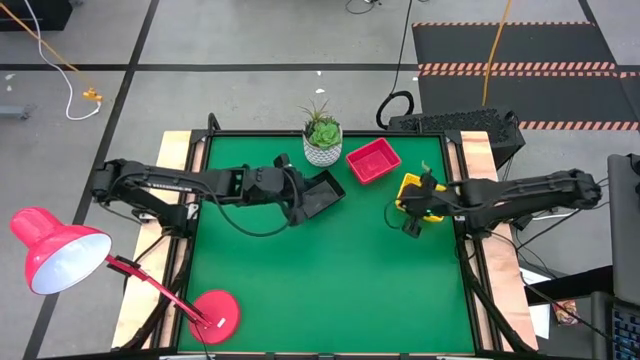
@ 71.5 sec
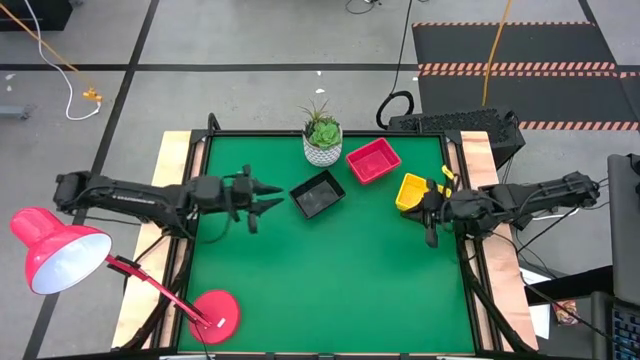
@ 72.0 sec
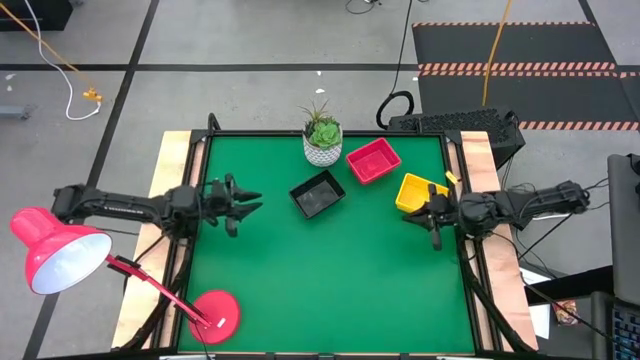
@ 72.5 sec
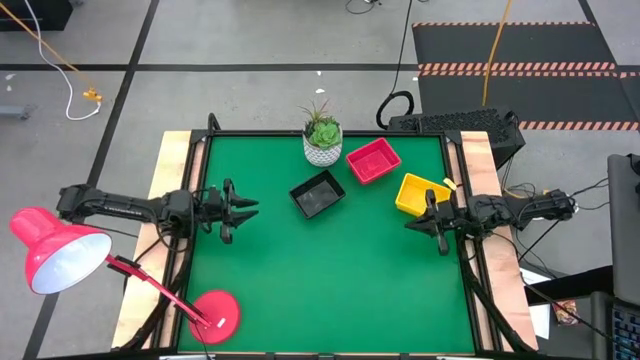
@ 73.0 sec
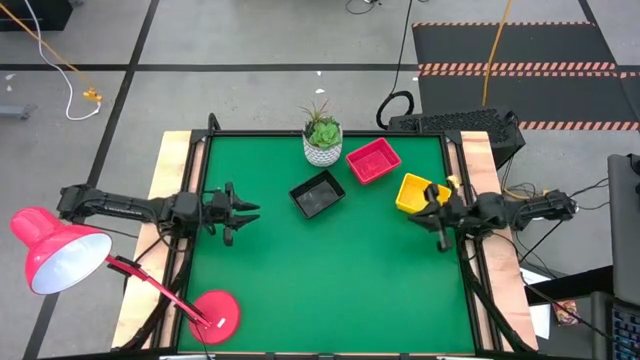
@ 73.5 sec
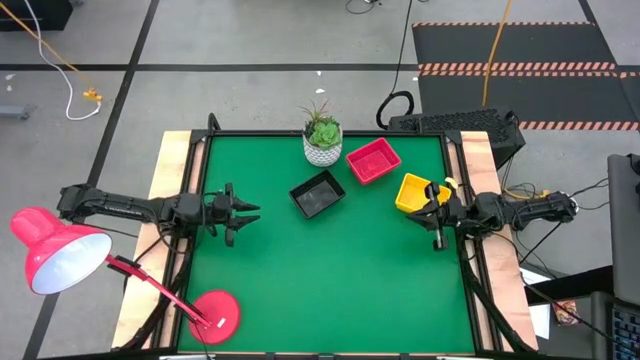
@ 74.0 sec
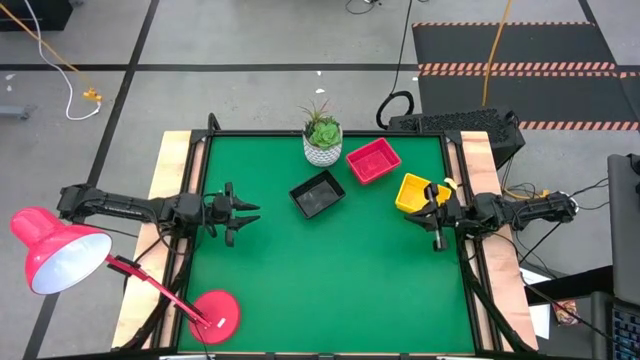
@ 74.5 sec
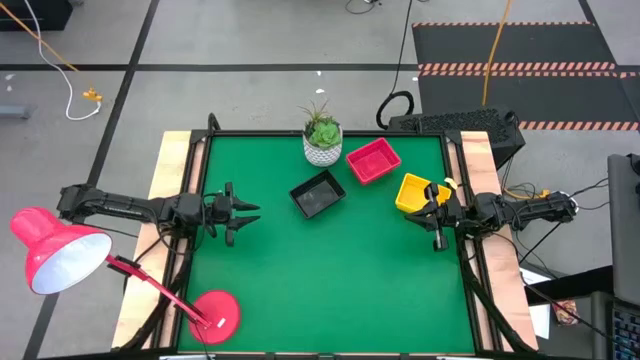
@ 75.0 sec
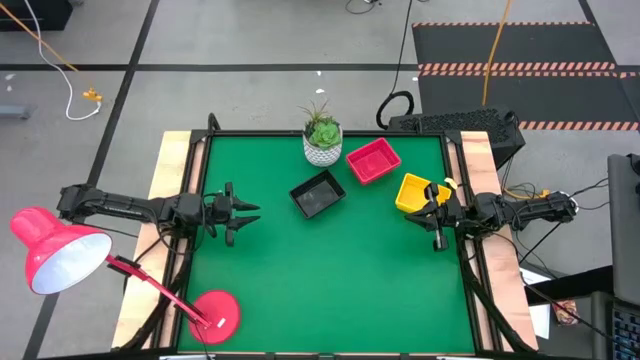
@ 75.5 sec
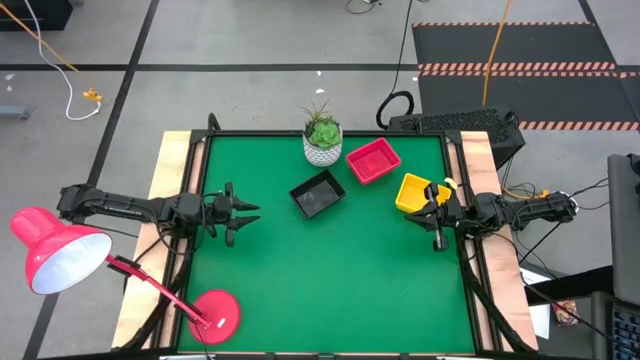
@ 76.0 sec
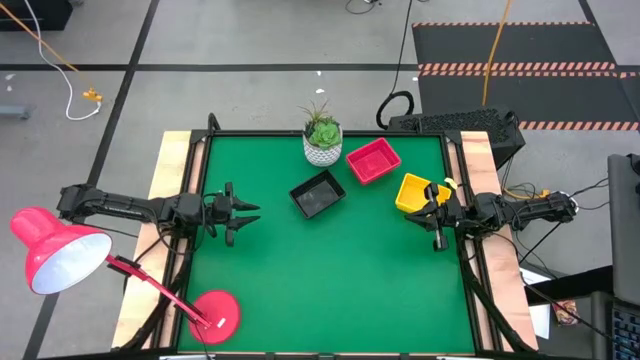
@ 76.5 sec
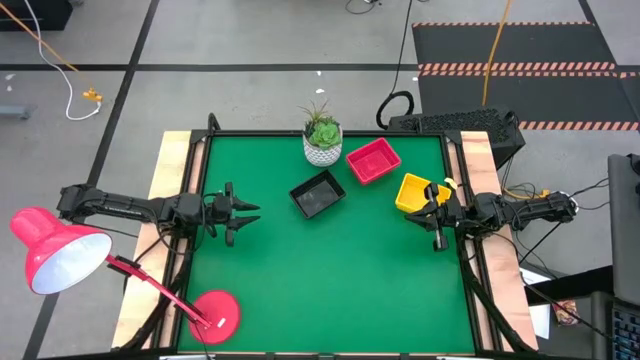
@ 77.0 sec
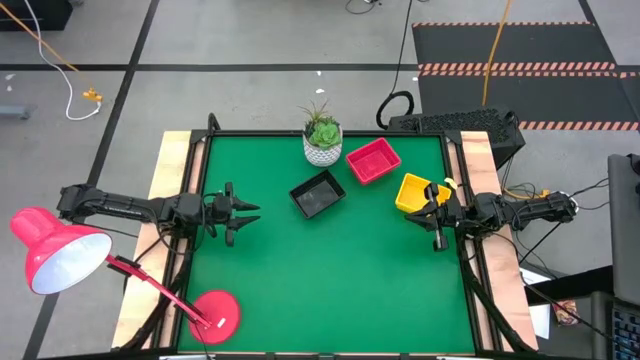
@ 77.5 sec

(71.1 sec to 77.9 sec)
Return to Home Position

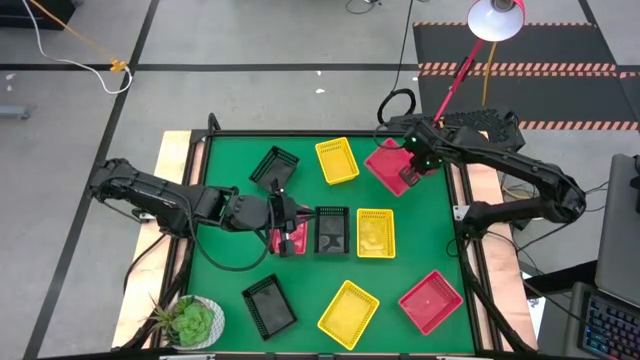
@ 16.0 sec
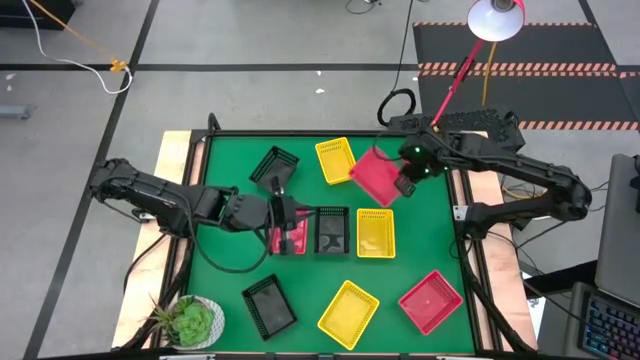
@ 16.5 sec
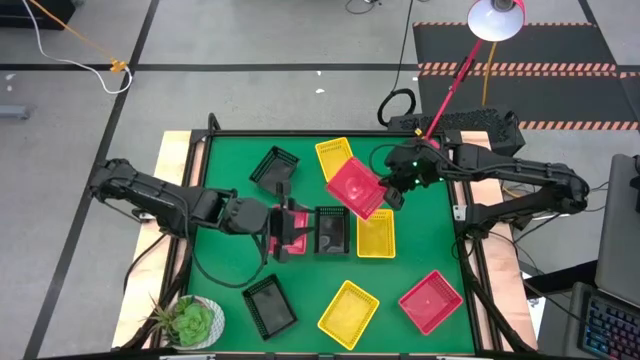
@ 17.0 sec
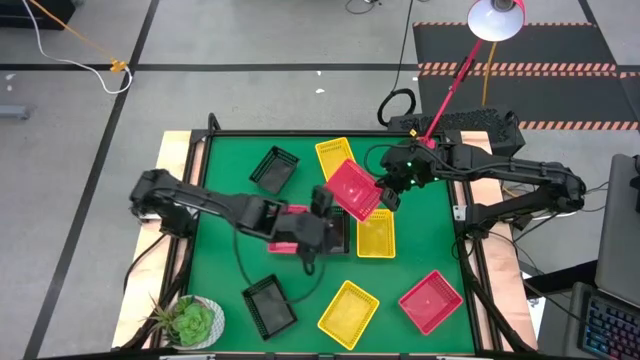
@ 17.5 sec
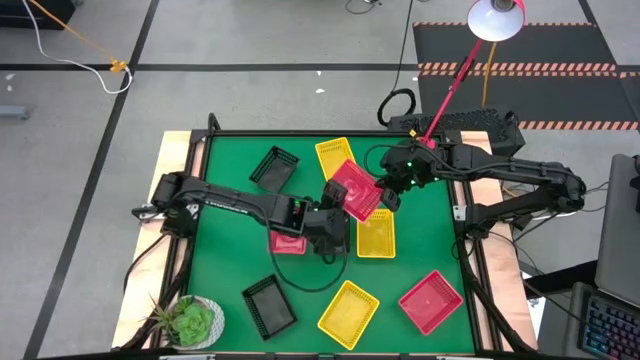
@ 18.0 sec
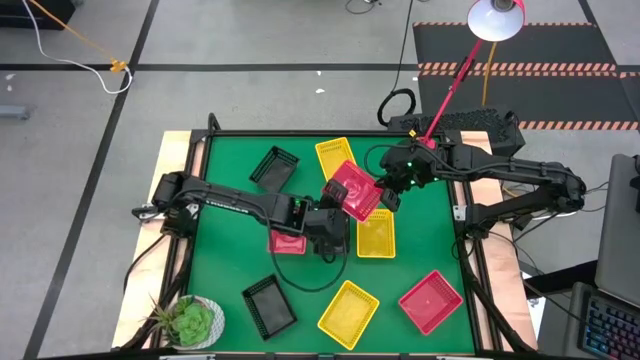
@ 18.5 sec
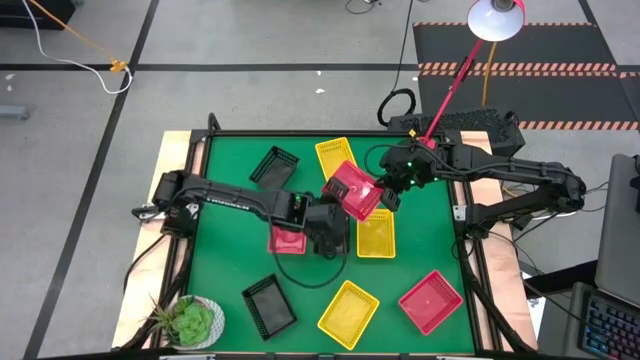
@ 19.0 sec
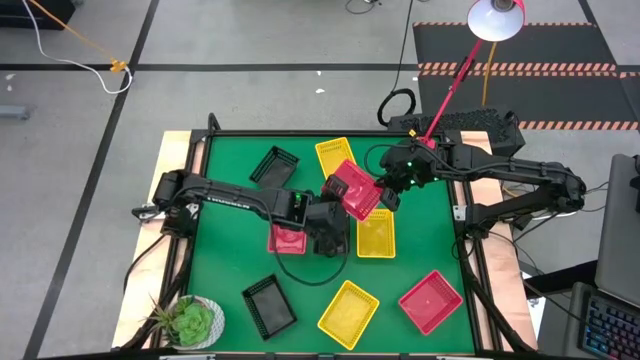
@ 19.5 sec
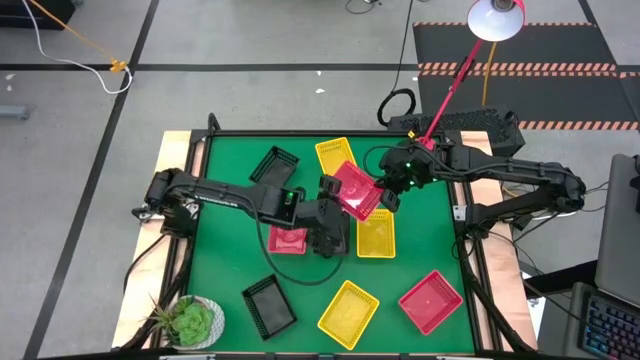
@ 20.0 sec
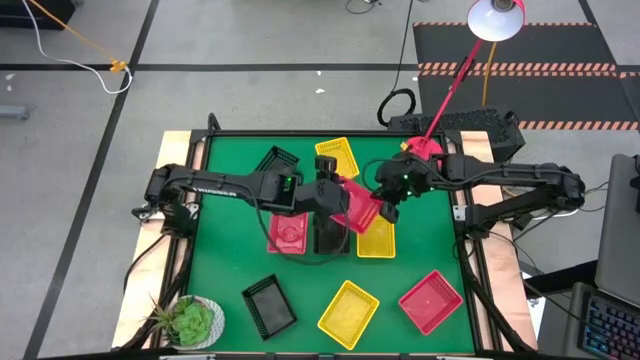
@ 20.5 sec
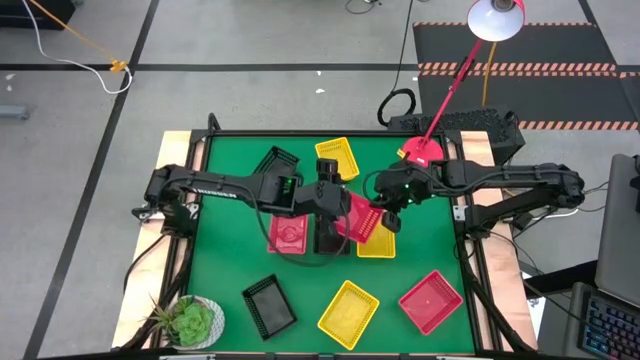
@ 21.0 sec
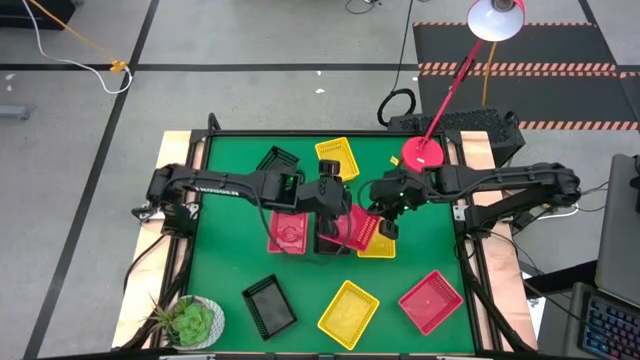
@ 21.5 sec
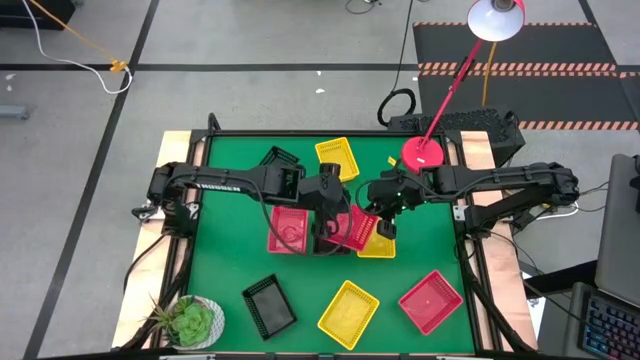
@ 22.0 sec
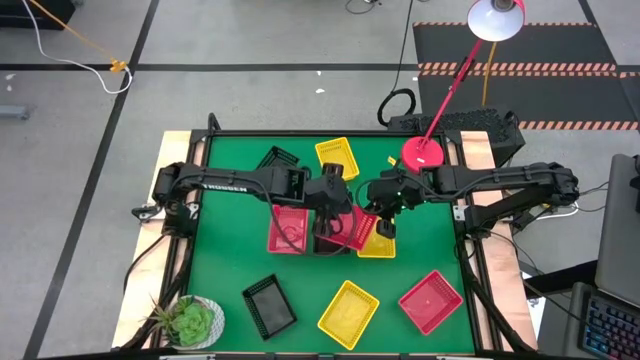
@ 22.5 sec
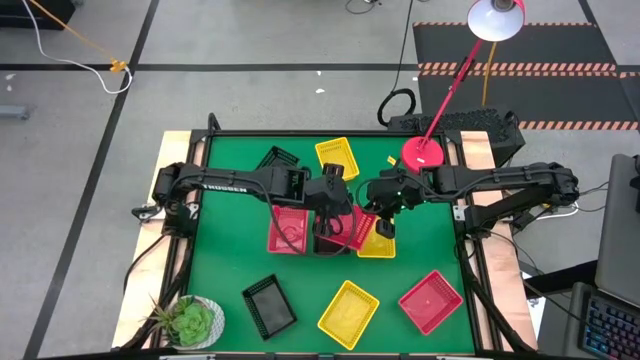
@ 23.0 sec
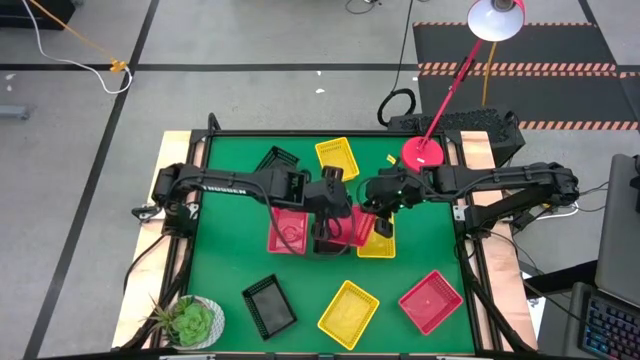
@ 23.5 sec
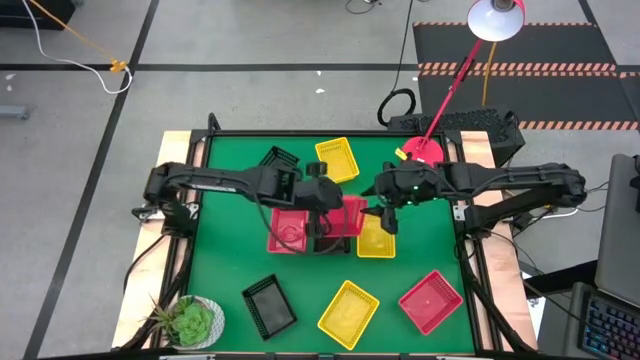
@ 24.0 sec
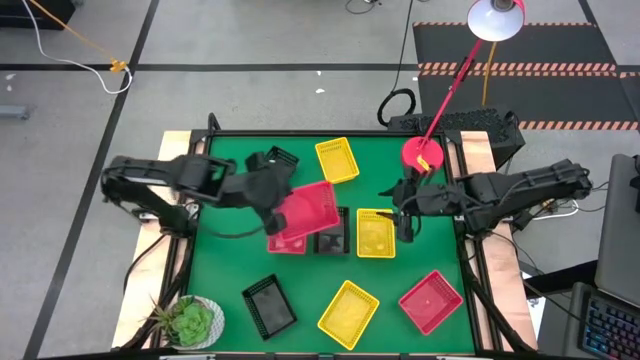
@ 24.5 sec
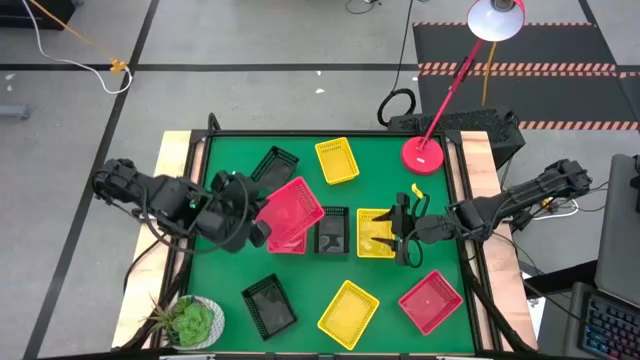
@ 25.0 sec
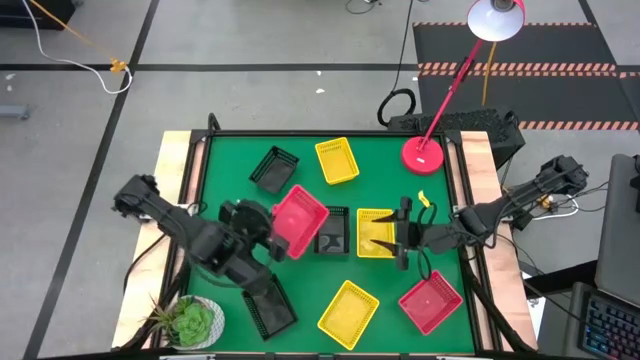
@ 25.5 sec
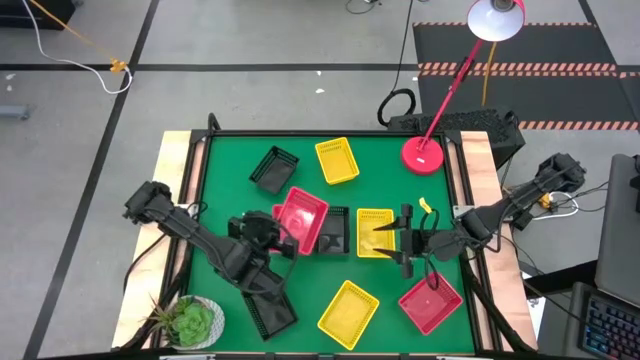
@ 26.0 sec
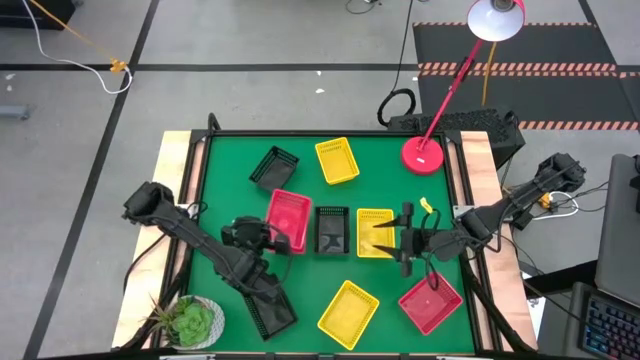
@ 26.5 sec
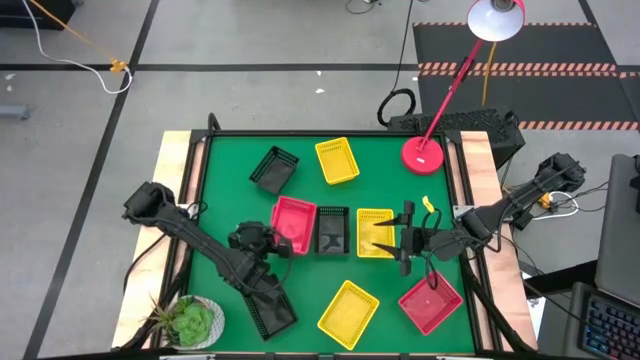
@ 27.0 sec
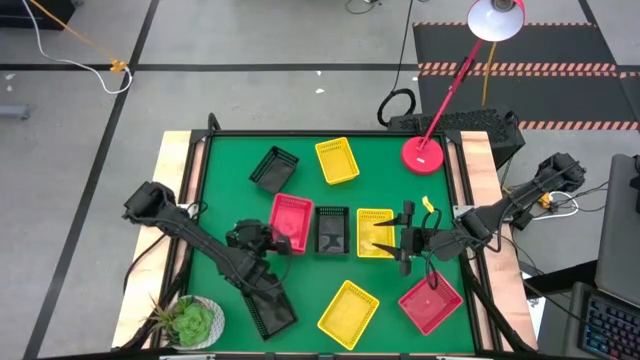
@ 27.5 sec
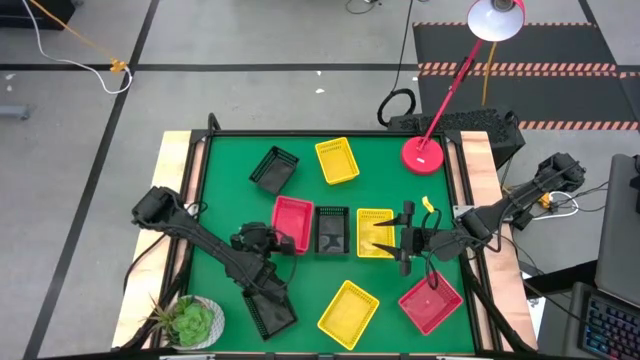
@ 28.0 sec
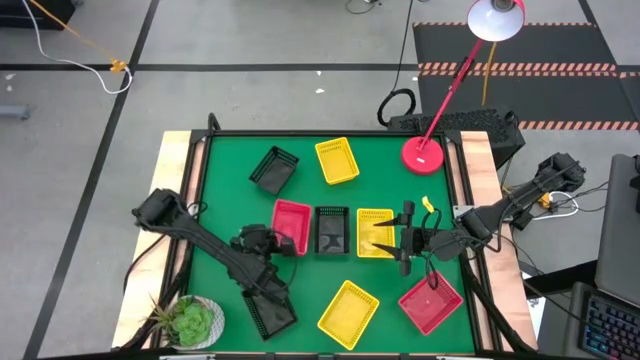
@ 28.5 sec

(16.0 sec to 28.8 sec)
Stack the top red bin on top of the middle red bin
